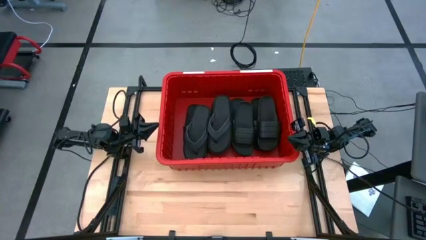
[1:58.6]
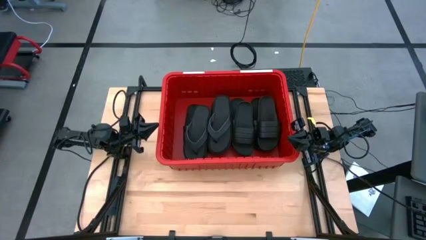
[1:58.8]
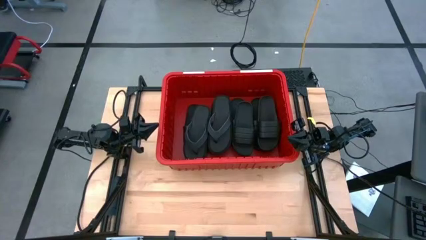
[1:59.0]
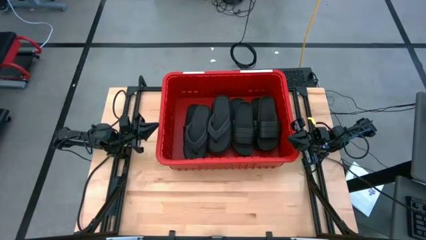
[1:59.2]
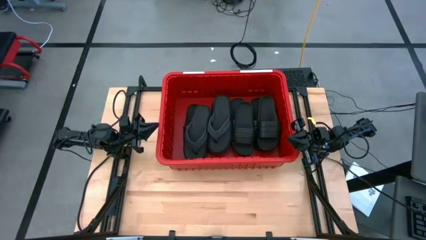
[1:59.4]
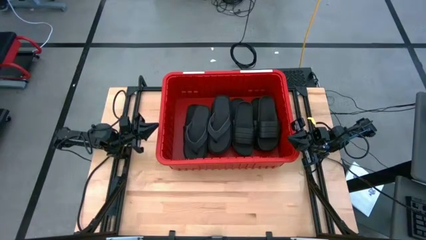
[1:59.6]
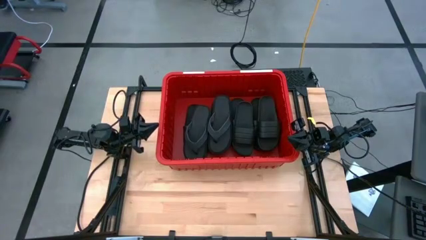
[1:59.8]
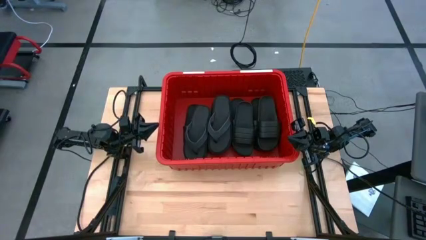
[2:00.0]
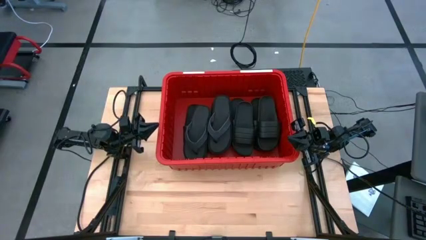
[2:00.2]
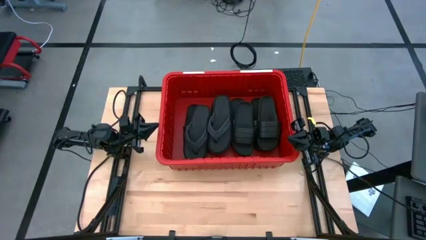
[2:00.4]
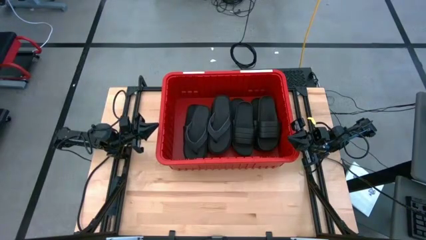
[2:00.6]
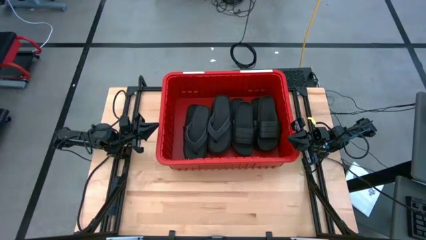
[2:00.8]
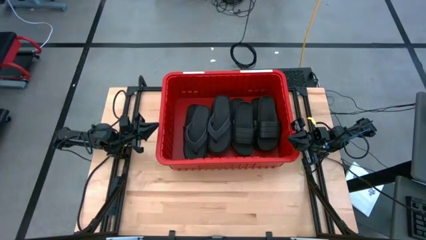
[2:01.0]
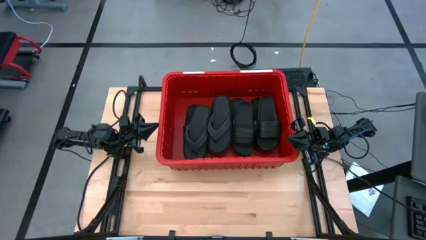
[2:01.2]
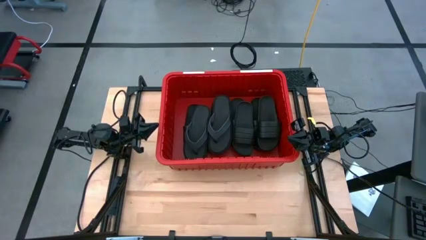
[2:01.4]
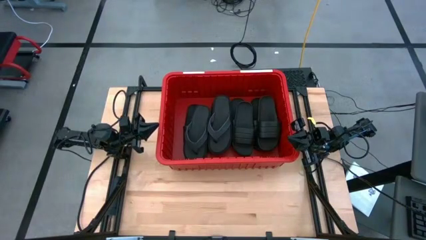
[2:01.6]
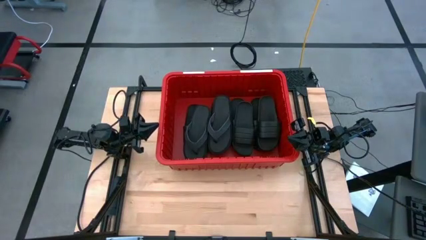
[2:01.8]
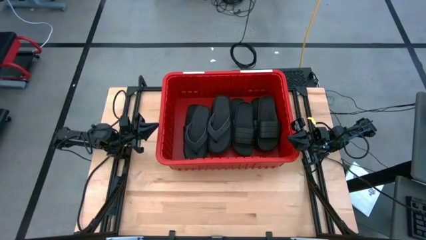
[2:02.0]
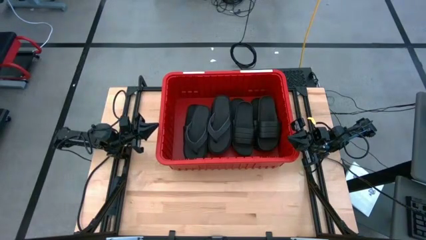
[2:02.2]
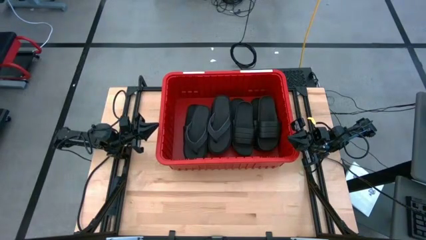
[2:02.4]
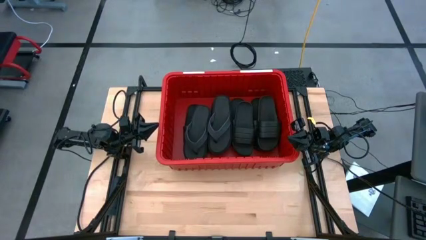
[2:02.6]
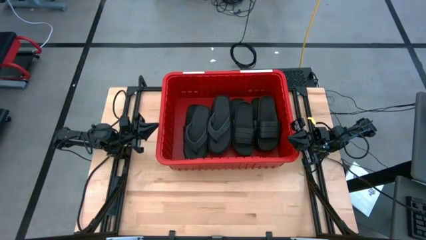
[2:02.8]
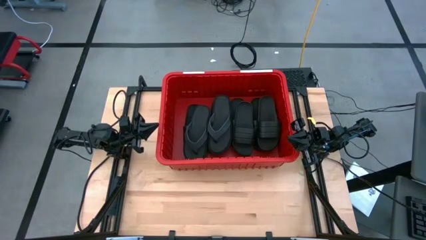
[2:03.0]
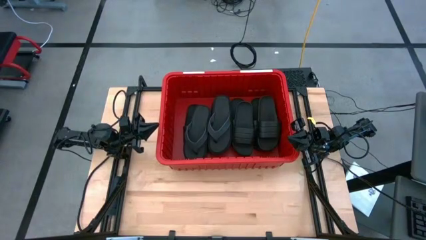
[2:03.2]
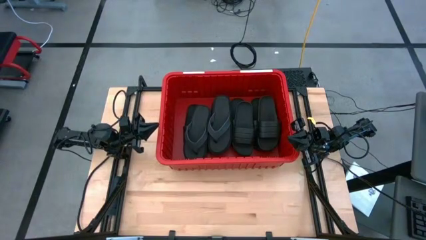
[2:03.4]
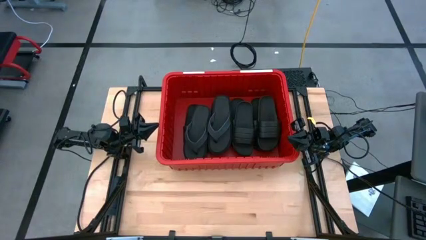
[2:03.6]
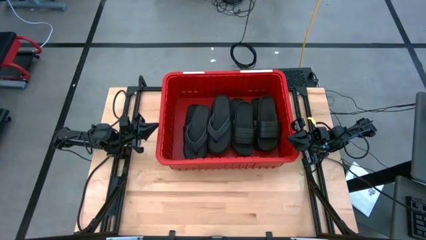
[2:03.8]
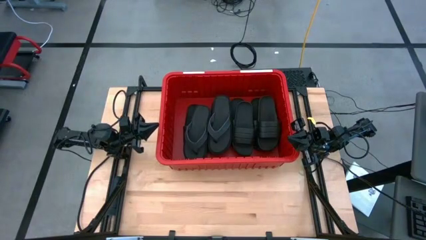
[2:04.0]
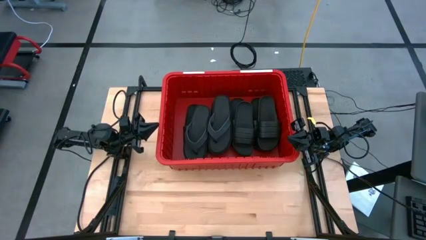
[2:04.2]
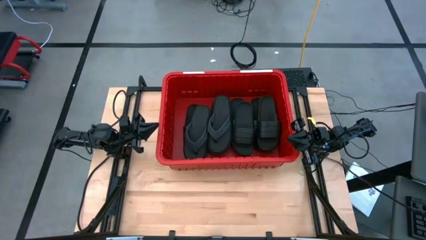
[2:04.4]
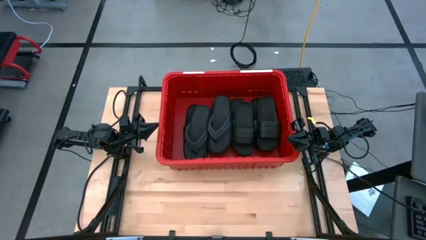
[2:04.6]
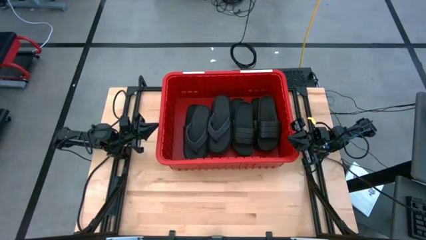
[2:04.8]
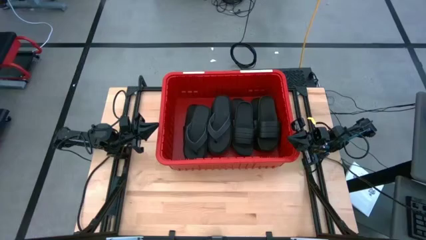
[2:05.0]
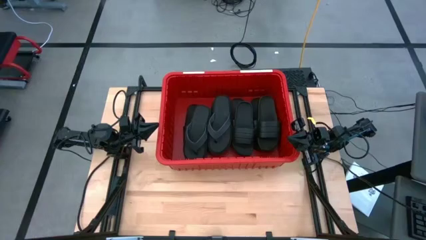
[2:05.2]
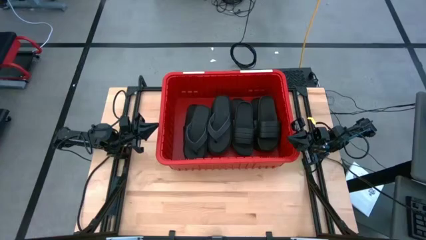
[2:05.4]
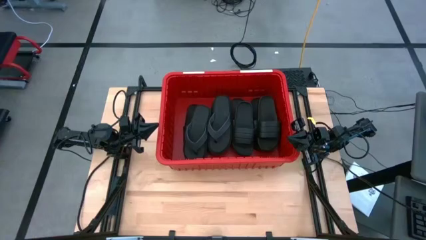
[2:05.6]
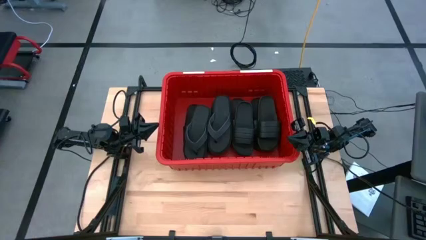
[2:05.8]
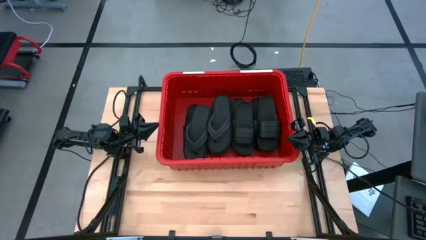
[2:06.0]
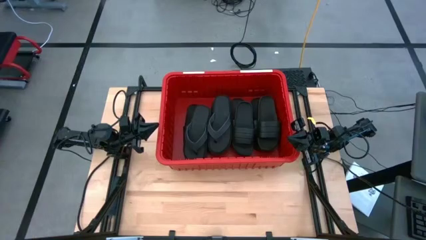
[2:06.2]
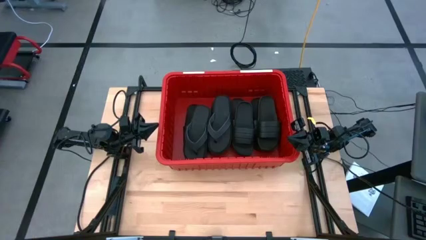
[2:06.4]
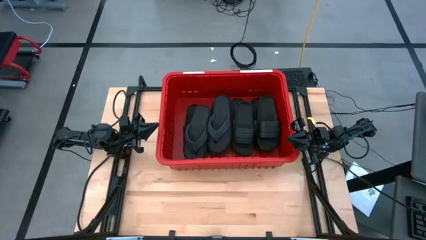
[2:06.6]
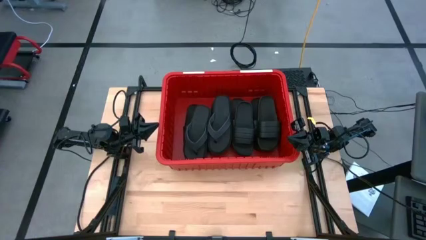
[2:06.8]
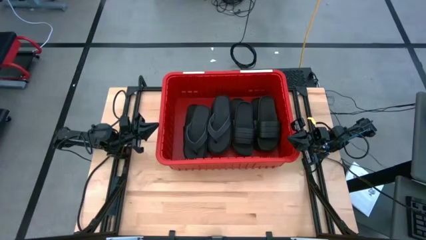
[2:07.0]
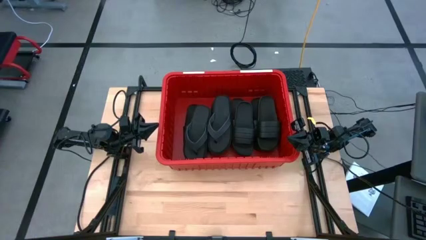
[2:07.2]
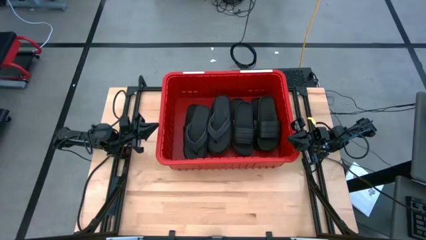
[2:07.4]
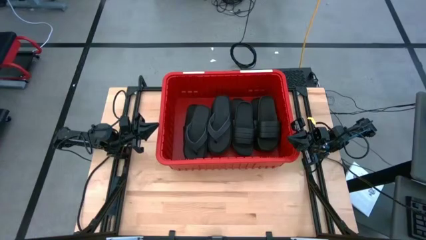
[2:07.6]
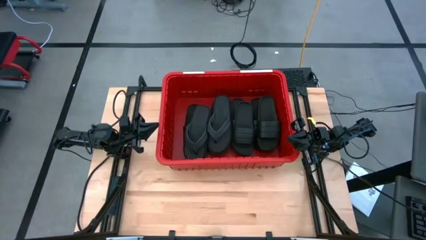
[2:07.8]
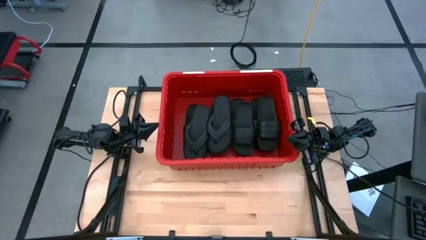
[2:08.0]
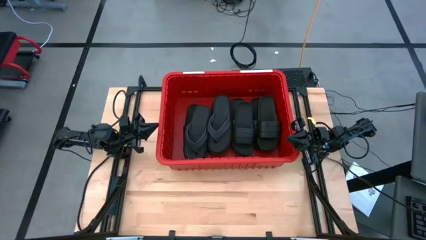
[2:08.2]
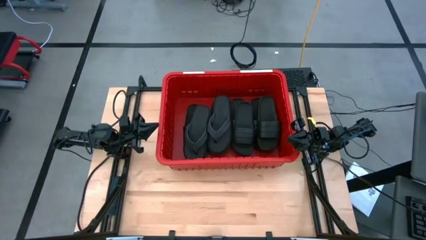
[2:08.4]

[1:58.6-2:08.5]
Task: Pick and place slides into bin
Return to Home Position

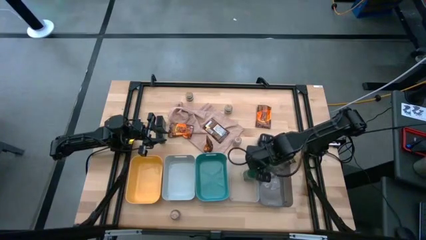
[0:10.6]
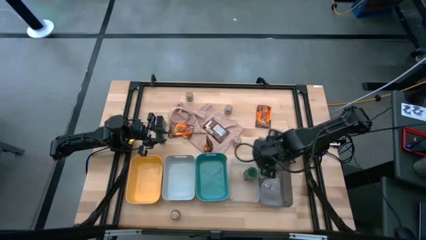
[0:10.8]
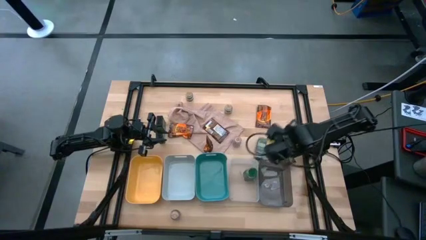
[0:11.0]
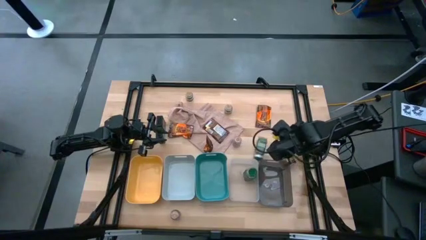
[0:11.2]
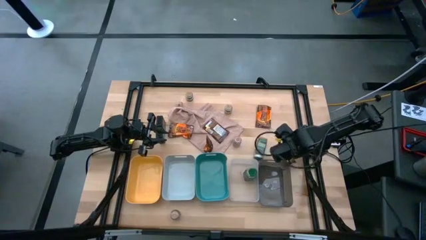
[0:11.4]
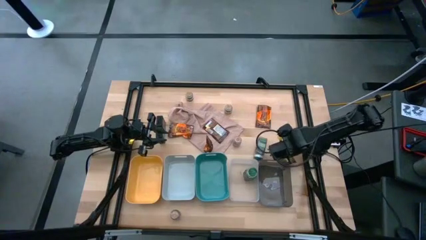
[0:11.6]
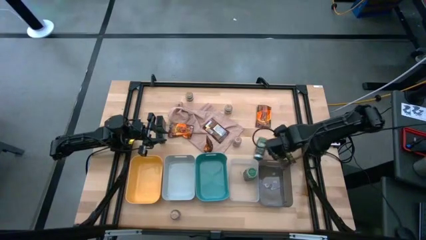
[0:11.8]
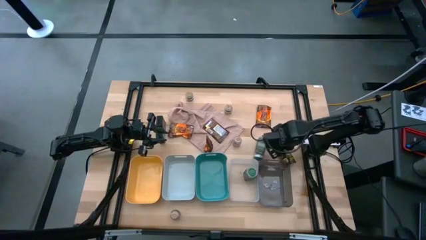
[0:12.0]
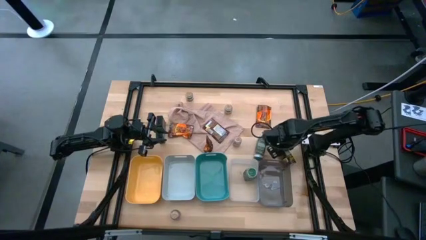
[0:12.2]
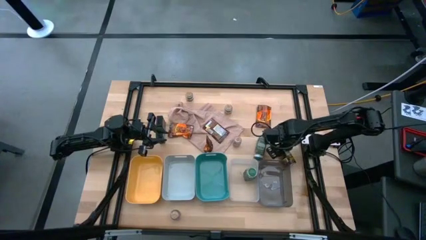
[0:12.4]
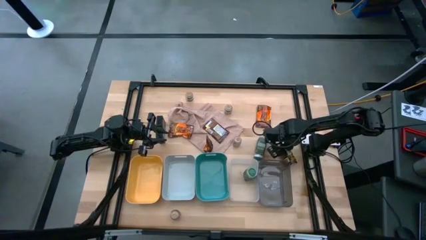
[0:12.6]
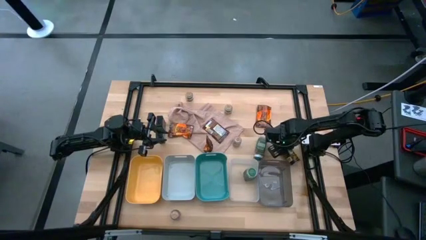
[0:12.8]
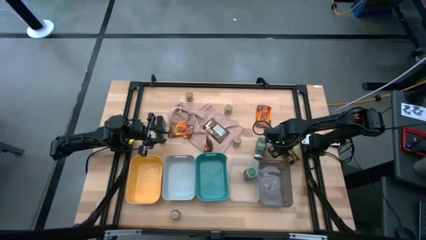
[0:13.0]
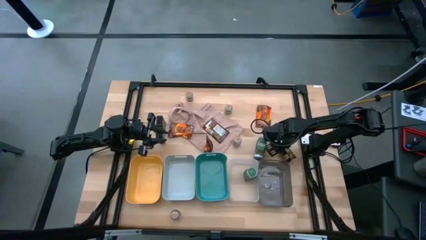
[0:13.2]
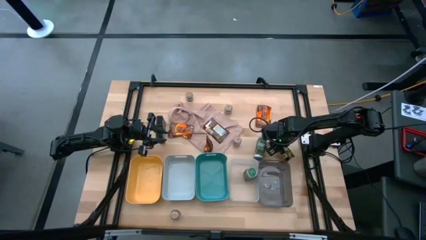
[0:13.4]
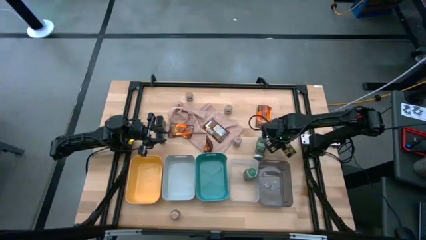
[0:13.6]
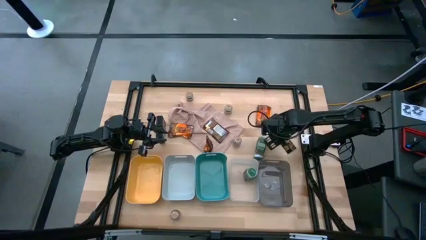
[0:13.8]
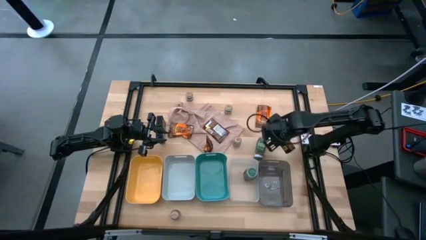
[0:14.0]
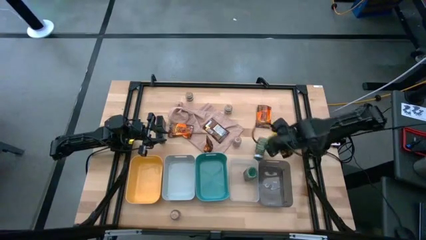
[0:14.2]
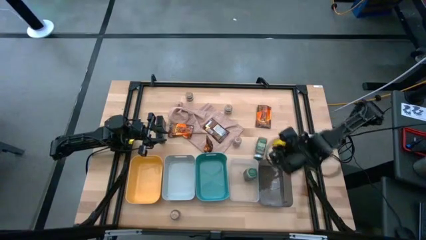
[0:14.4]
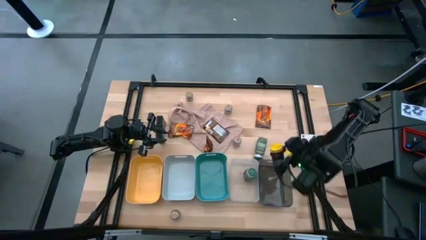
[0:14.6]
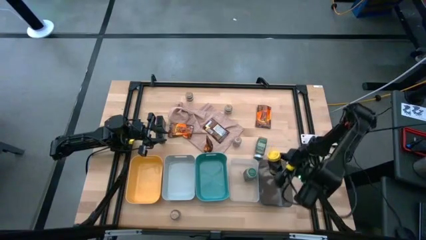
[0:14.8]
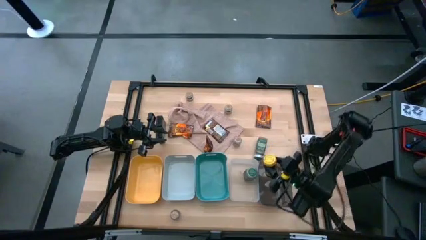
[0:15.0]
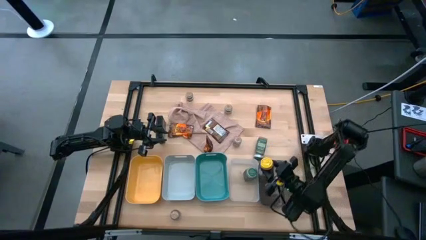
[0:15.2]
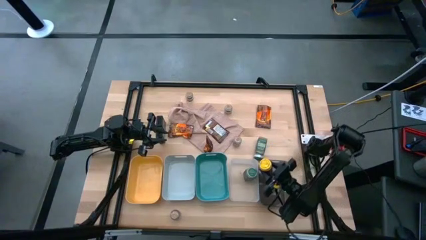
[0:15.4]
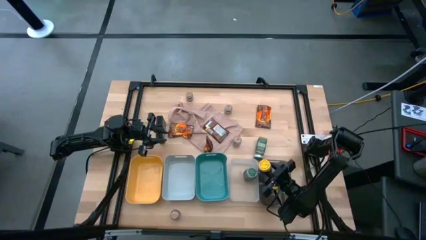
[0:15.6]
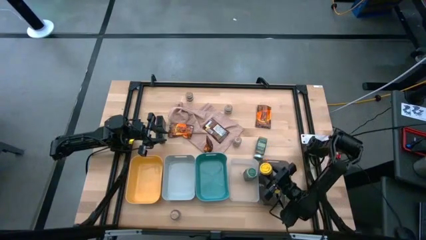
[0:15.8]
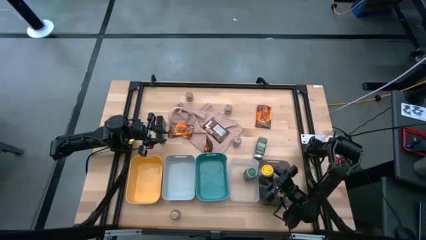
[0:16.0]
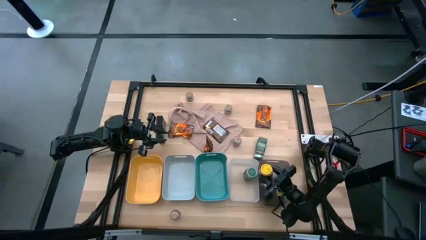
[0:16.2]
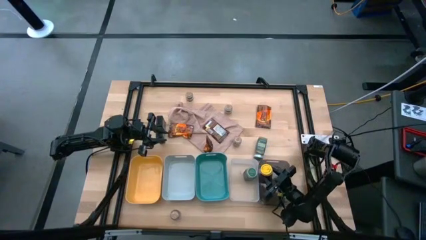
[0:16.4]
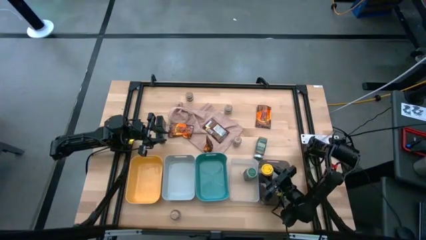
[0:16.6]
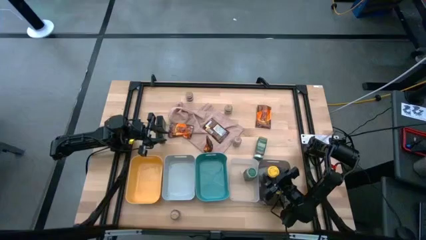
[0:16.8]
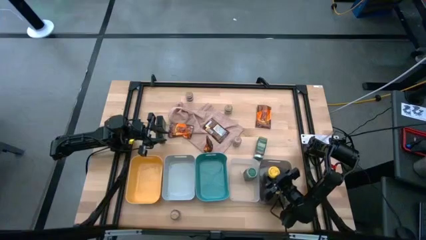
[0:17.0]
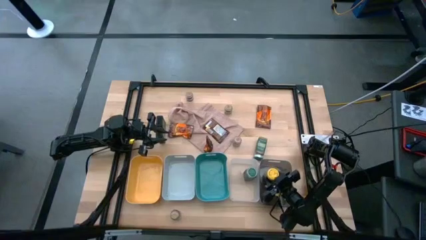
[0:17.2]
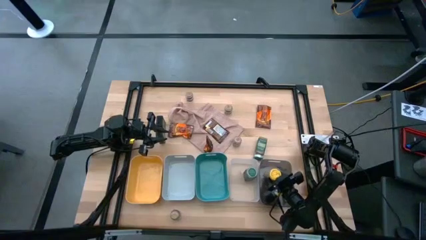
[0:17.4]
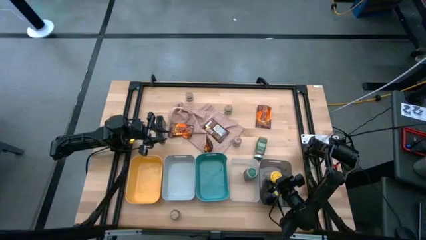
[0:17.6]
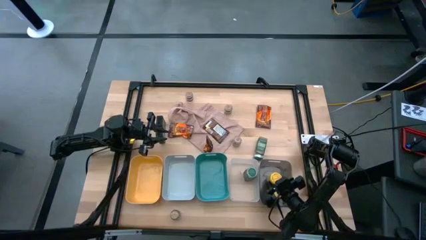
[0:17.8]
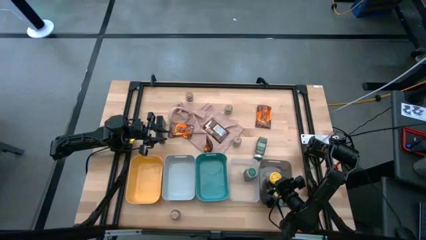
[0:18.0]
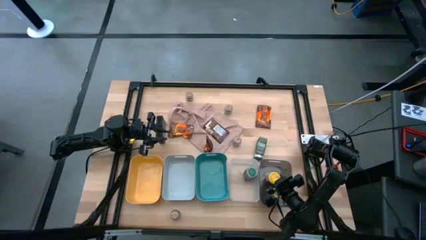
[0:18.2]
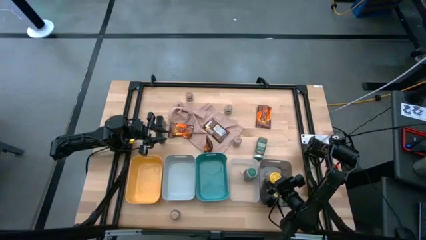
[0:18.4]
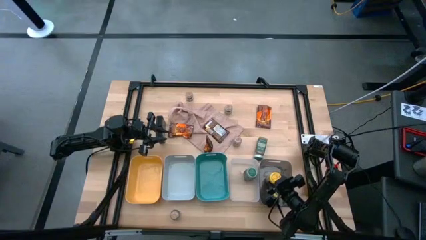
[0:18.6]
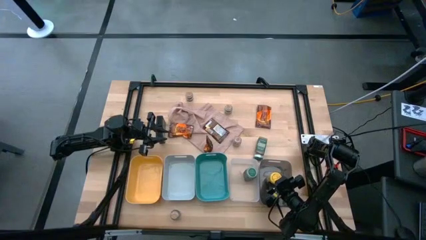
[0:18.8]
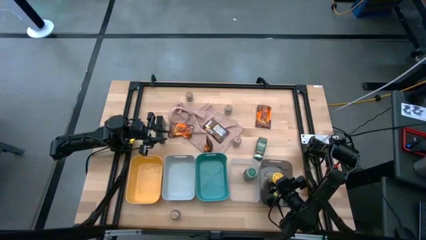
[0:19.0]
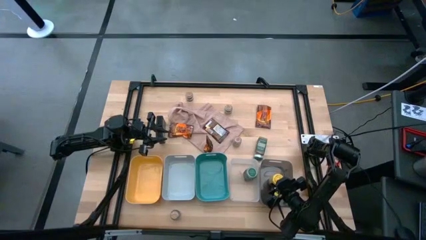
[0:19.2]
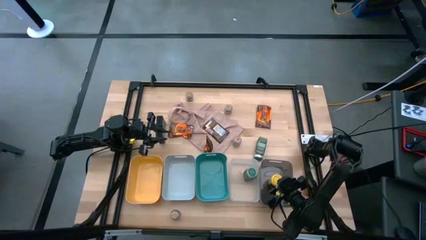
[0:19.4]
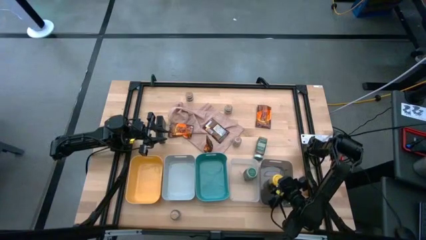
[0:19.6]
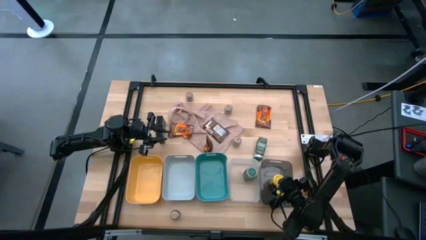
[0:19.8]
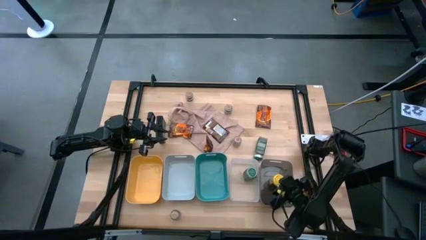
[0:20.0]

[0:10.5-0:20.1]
Task: Sort spices by type
Put the yellow seasoning bottle into the black bin
